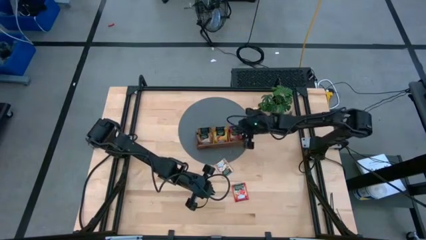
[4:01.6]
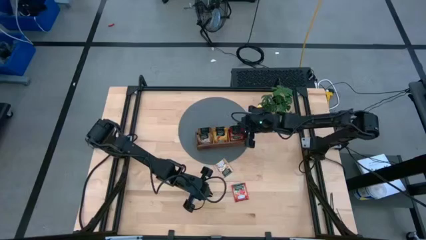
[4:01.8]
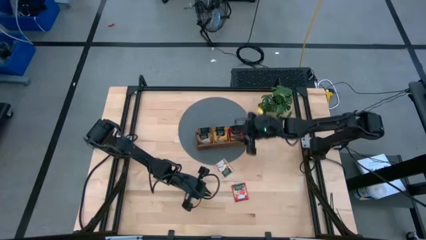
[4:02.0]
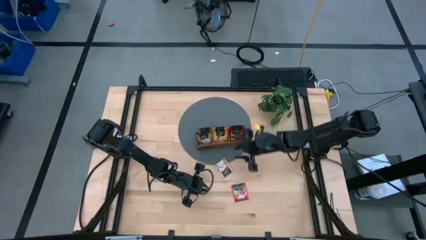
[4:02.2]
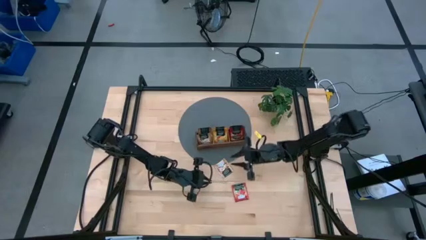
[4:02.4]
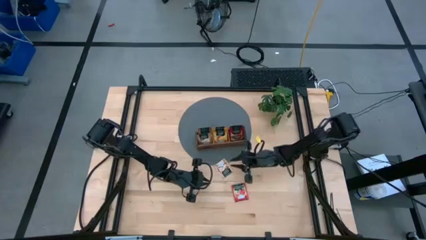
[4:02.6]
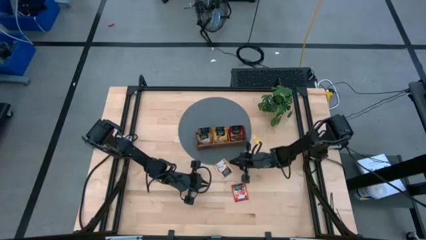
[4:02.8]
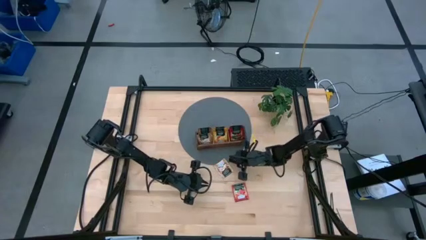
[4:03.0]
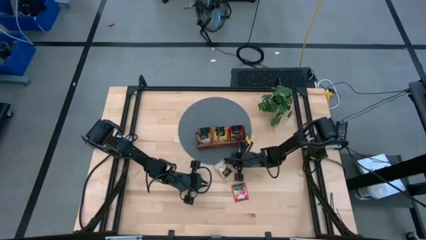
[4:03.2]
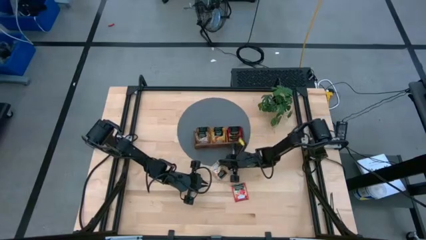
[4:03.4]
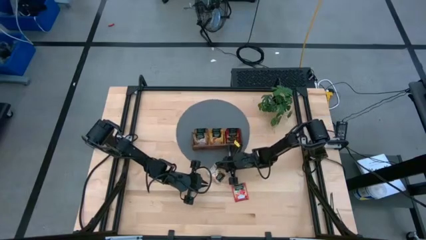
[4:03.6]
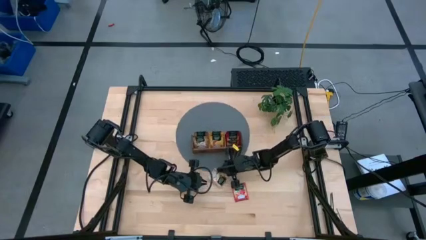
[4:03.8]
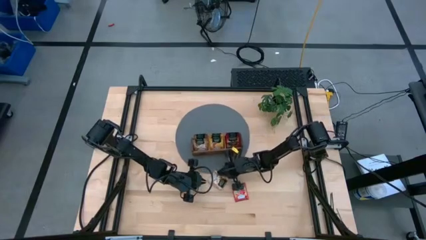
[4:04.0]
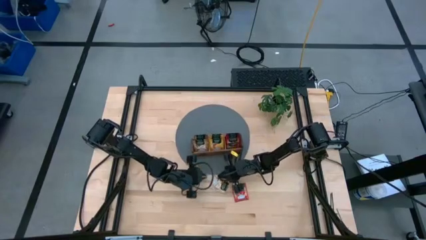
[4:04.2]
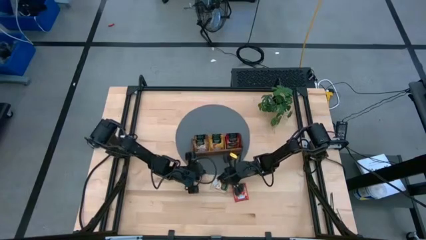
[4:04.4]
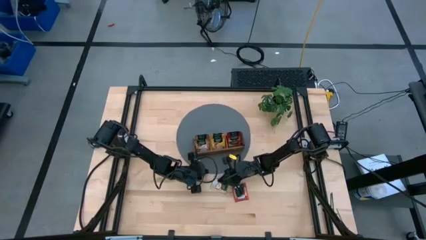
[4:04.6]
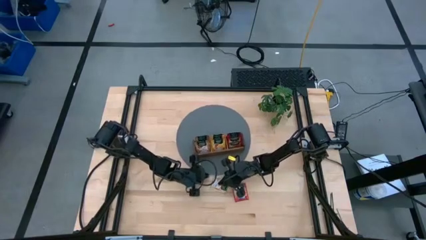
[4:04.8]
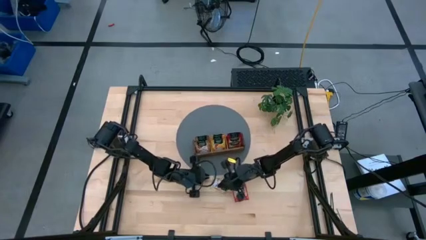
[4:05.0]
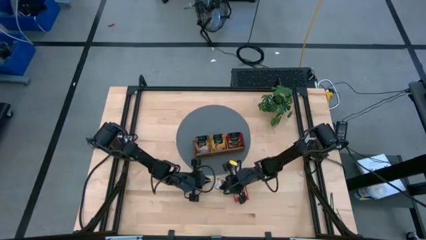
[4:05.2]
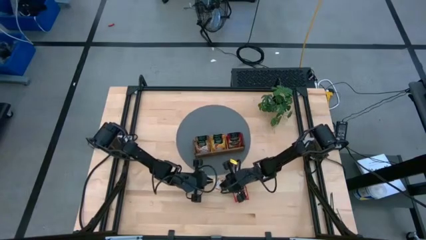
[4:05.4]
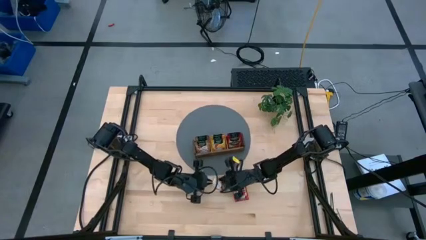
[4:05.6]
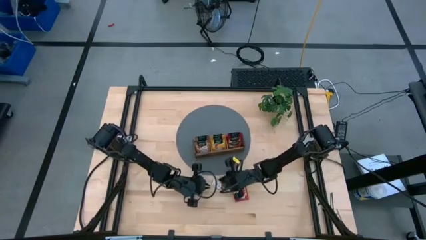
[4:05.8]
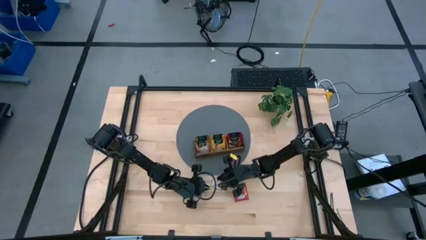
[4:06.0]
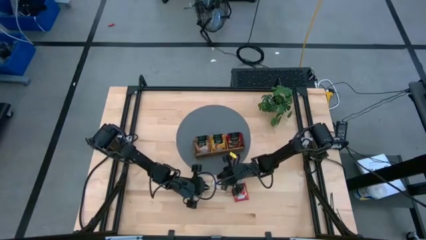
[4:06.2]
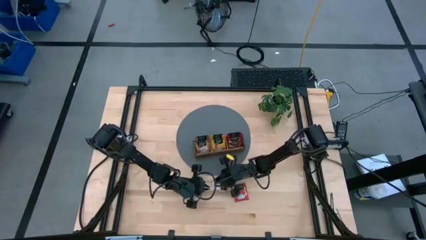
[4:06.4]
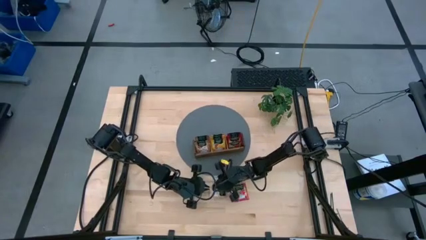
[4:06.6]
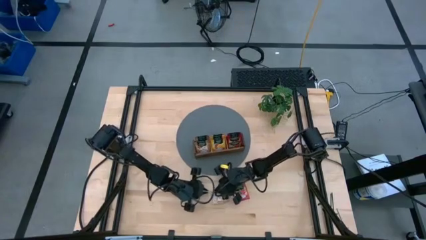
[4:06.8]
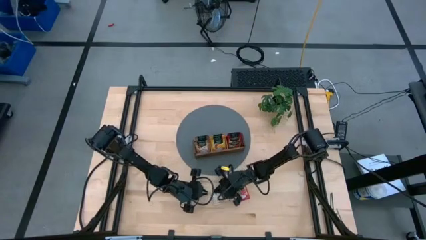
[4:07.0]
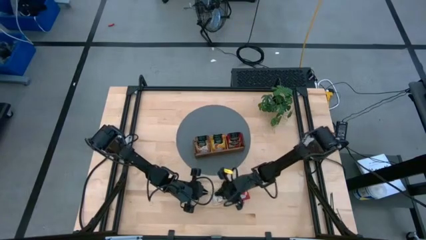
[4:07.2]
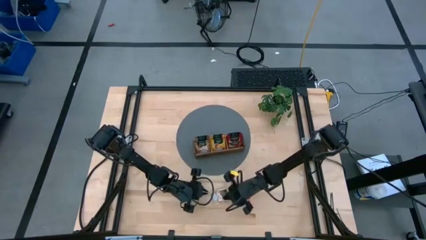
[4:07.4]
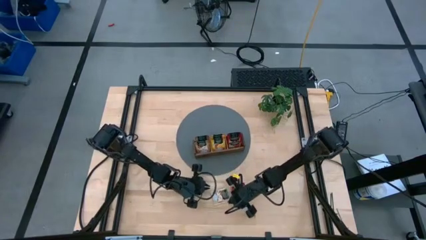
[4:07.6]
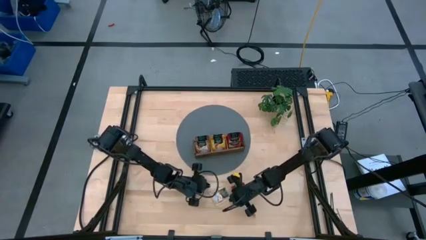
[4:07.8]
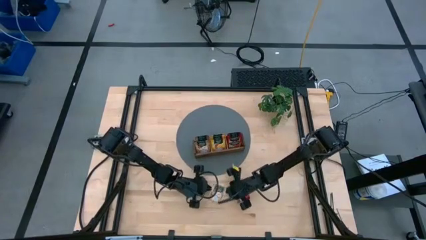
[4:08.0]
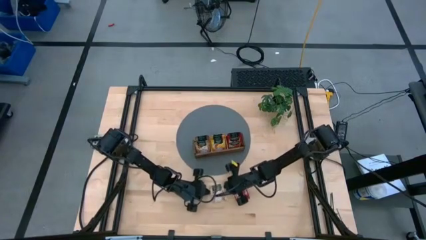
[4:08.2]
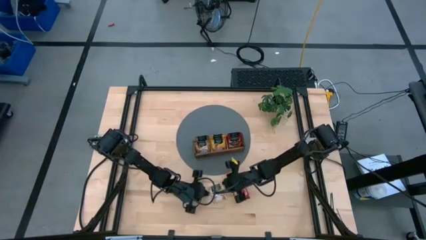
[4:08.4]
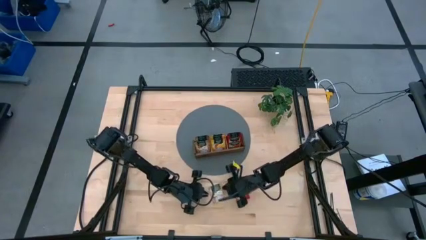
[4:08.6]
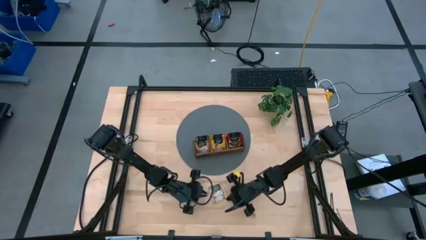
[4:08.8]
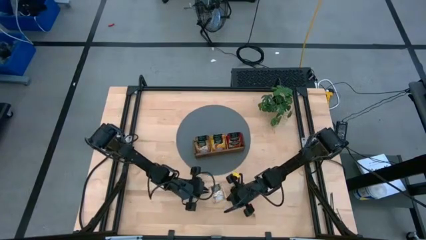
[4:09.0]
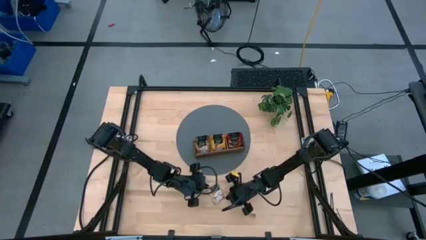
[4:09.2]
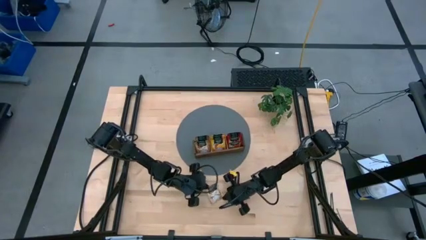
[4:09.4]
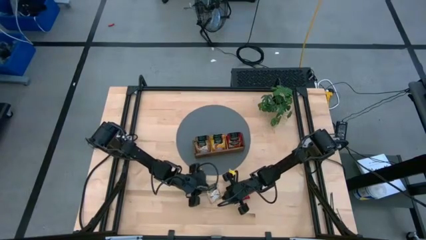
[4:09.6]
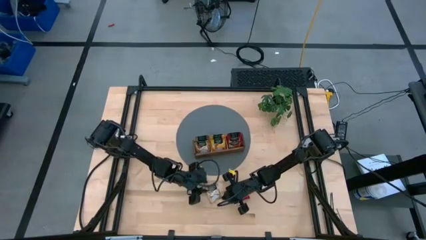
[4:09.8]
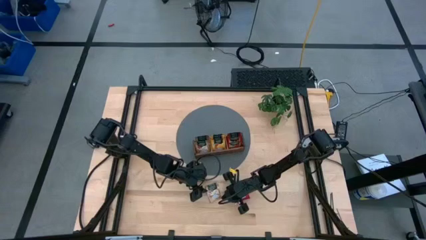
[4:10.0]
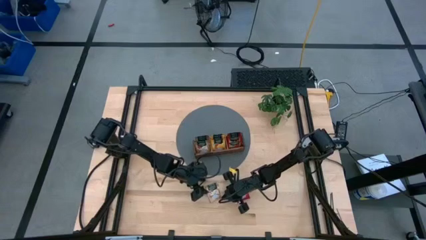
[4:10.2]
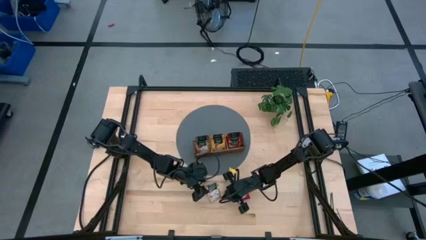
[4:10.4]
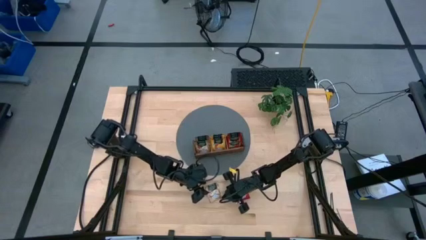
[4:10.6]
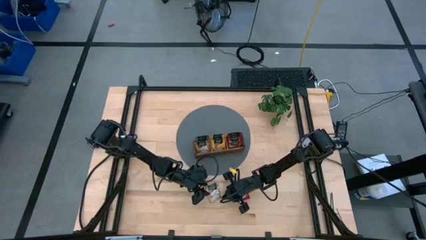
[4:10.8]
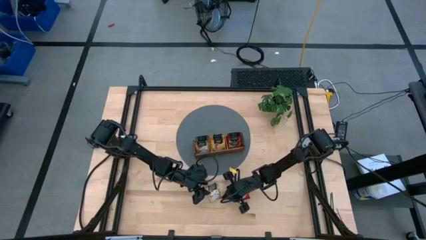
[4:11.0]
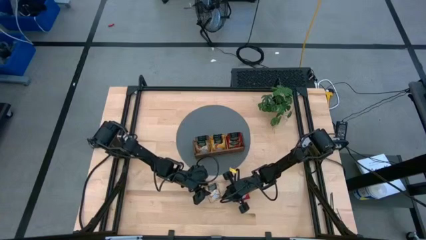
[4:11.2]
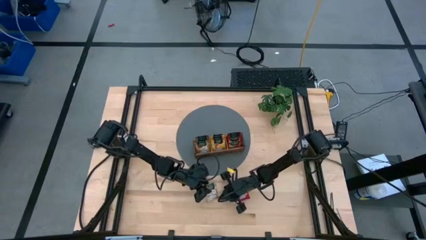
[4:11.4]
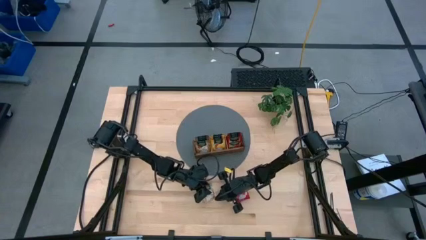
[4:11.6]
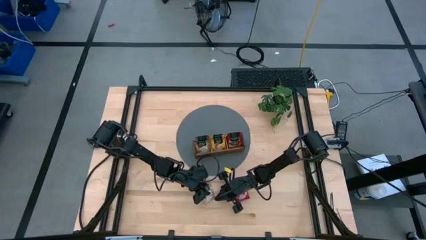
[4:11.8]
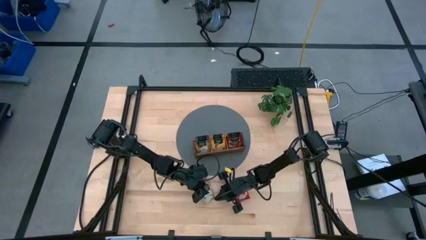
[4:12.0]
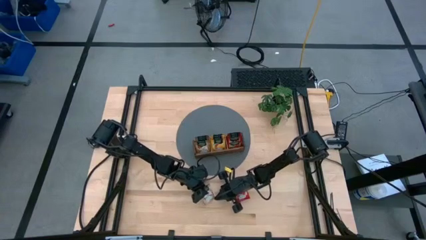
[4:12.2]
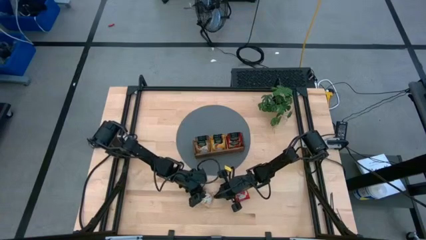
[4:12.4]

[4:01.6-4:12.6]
Task: Pick & Place Tea
Put the brown tea bag into the left section of the wooden organizer

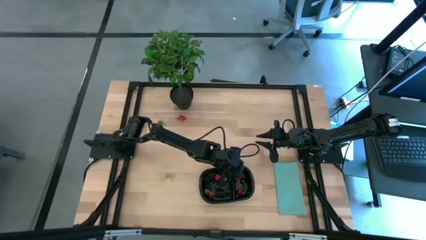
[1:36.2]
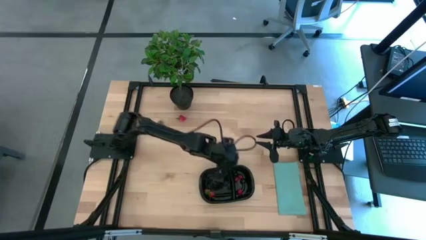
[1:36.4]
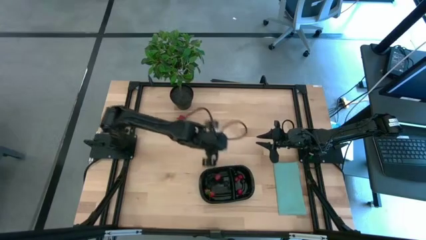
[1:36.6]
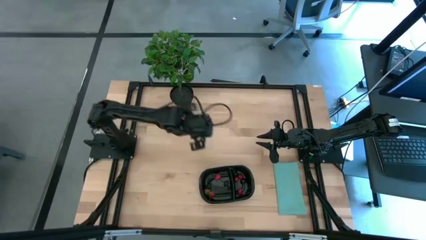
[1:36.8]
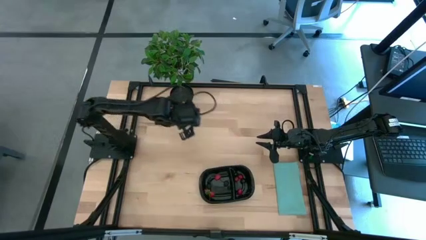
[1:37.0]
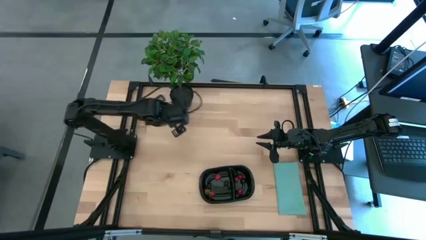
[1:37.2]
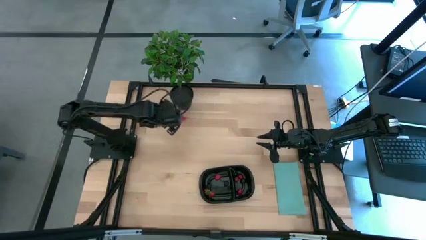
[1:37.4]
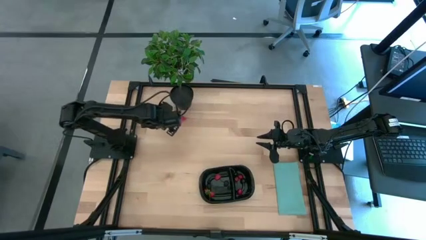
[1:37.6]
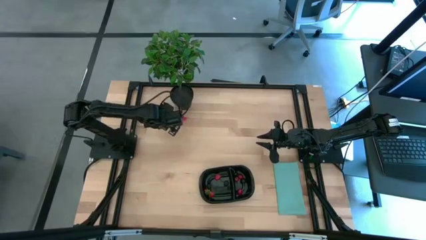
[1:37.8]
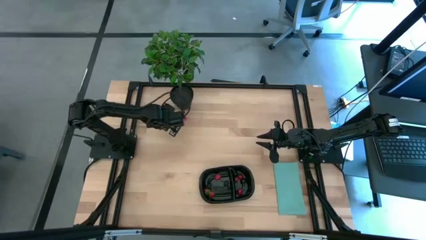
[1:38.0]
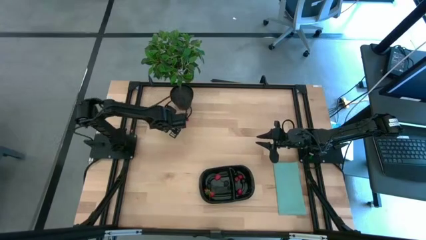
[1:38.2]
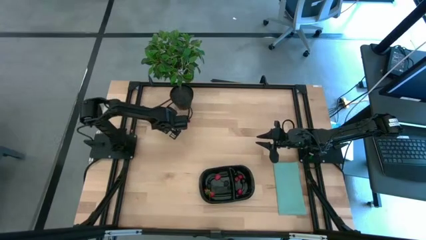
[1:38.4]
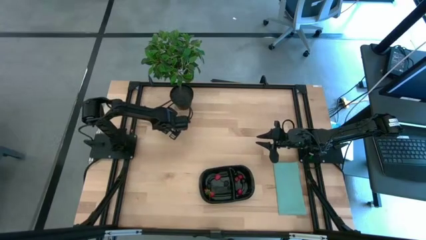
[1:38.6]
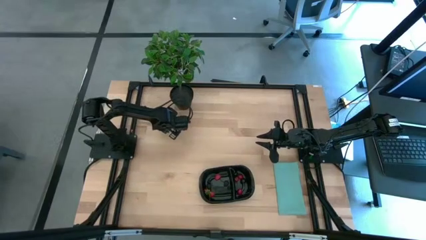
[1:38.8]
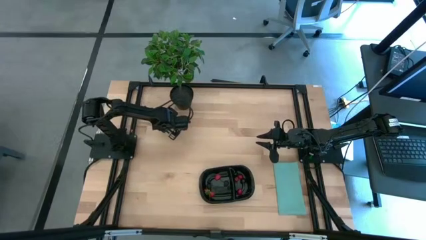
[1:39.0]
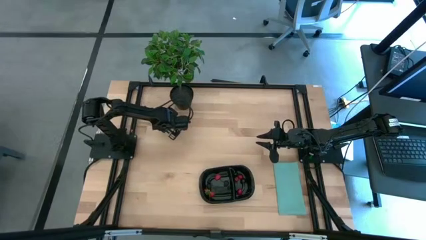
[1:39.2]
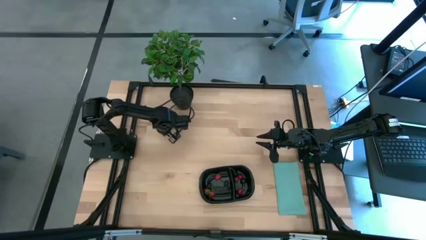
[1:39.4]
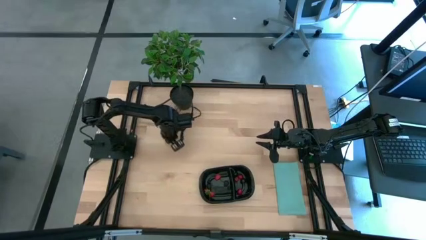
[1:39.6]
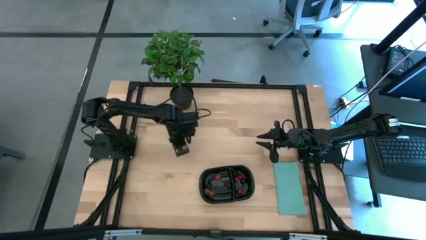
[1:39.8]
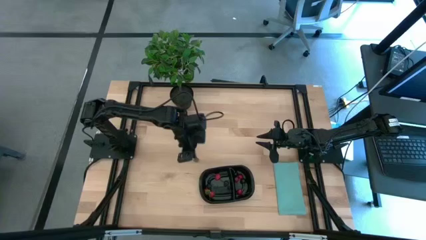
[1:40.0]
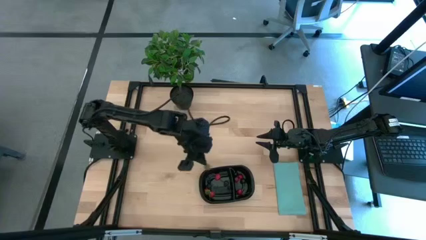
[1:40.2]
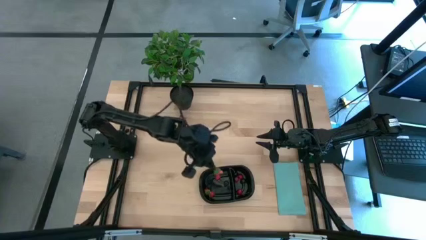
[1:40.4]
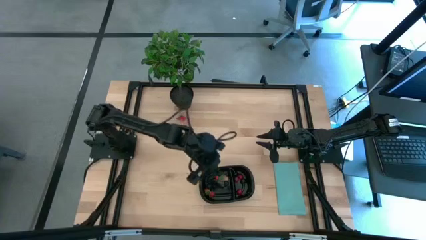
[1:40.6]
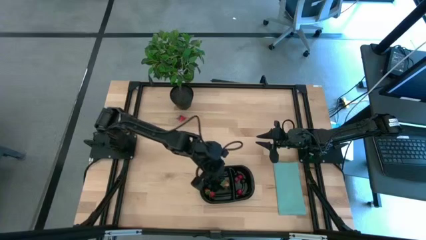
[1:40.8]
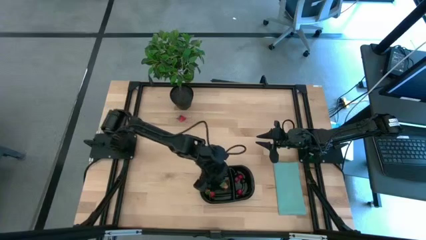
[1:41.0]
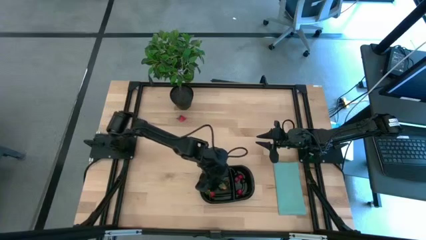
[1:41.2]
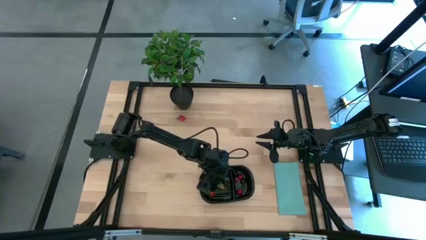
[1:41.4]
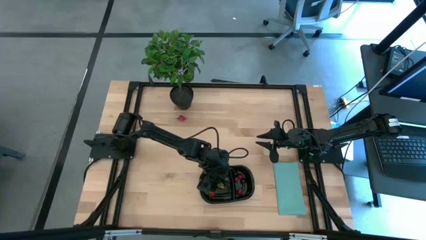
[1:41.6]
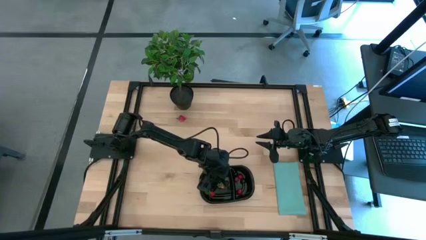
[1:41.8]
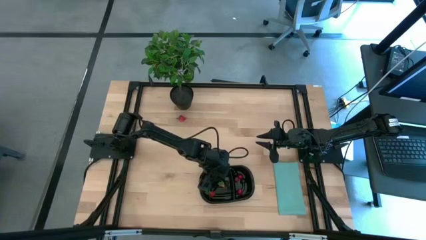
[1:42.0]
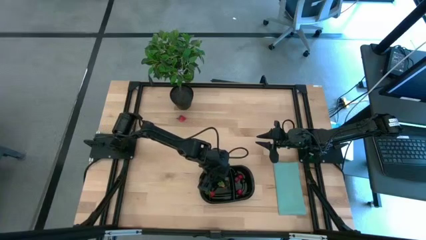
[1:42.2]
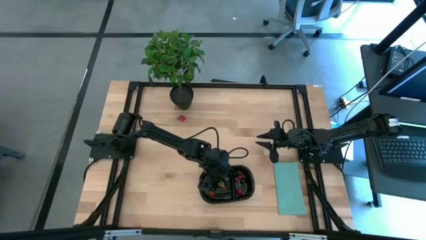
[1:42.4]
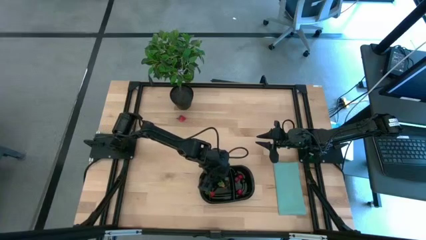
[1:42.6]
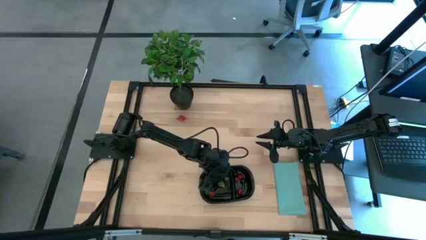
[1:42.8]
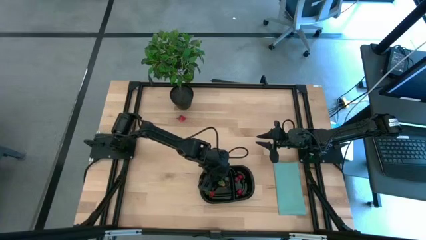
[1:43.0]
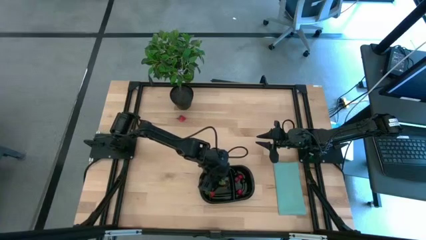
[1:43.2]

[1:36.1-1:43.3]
Task: Pick and placing Produce into tupperware
Put the left strawberry into the left side of the black container
